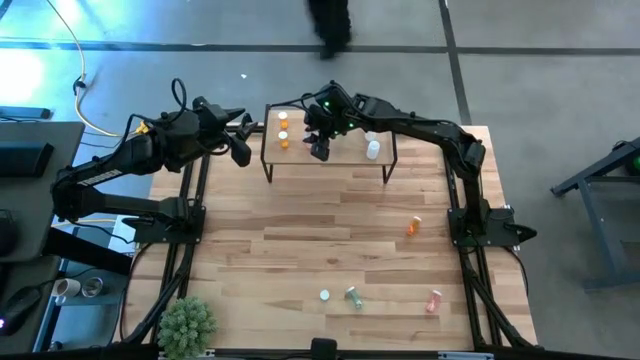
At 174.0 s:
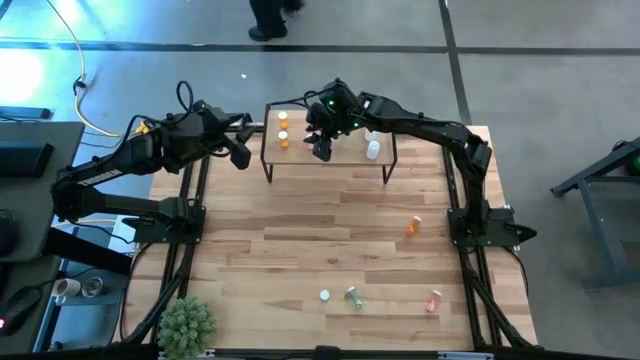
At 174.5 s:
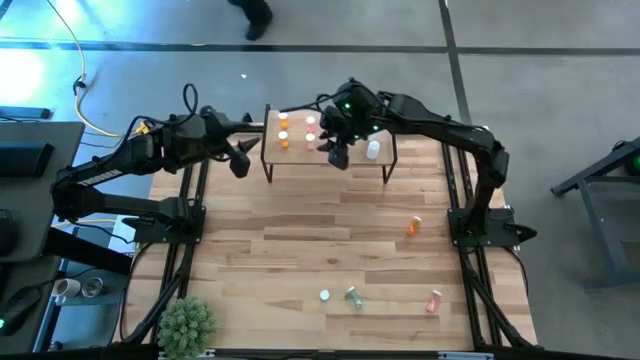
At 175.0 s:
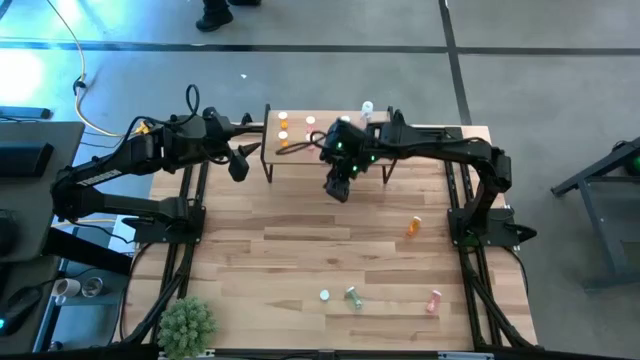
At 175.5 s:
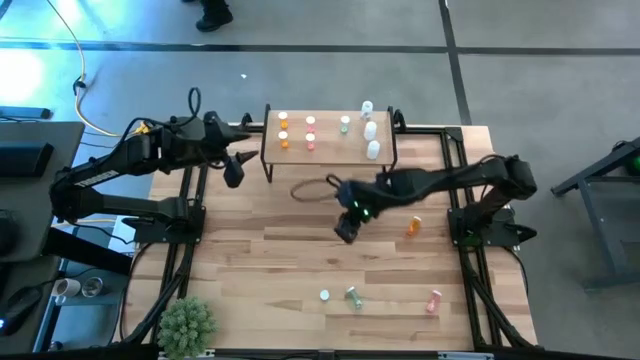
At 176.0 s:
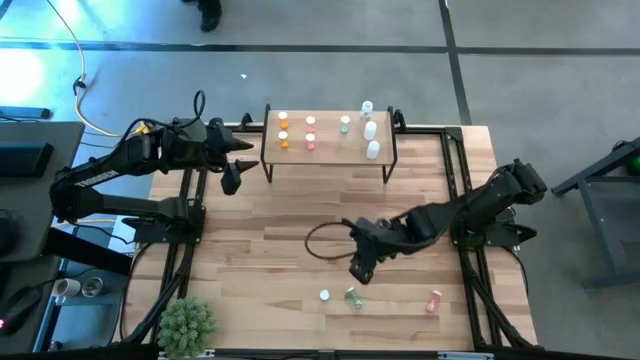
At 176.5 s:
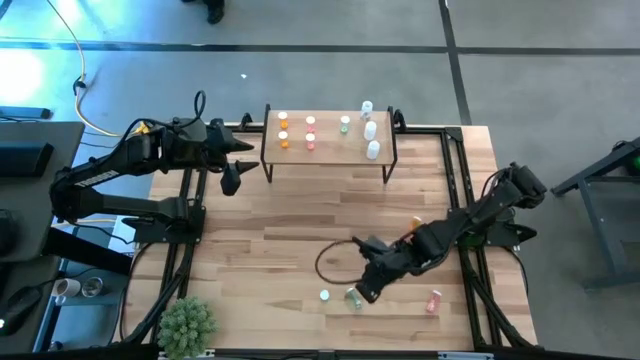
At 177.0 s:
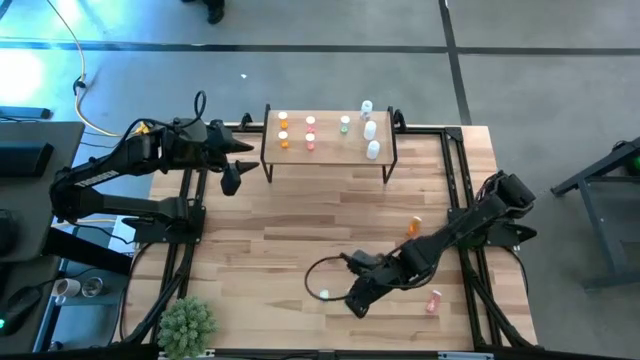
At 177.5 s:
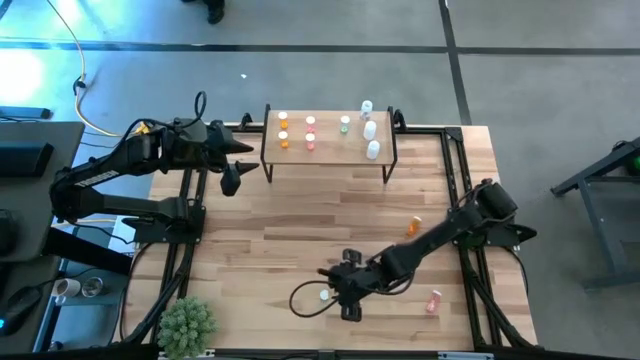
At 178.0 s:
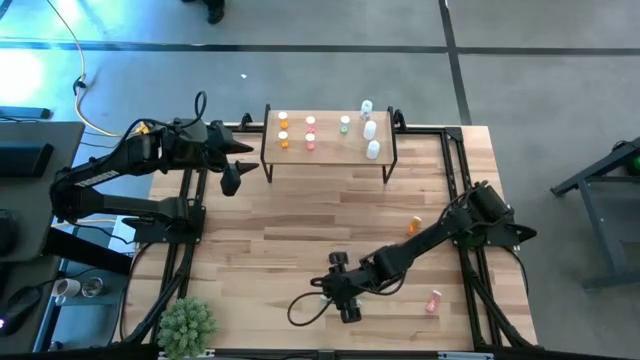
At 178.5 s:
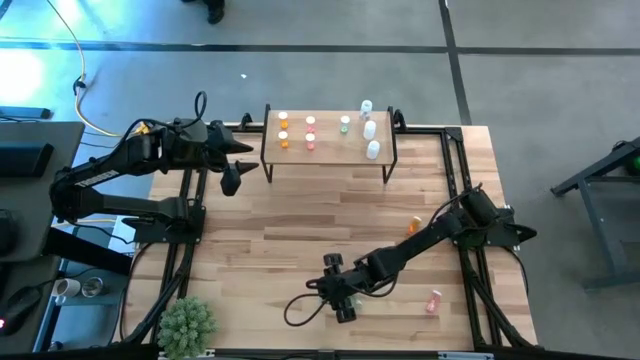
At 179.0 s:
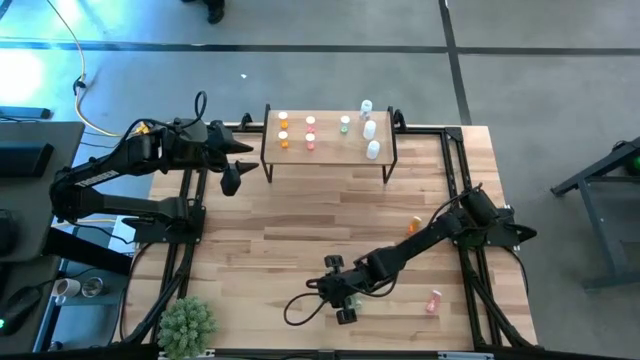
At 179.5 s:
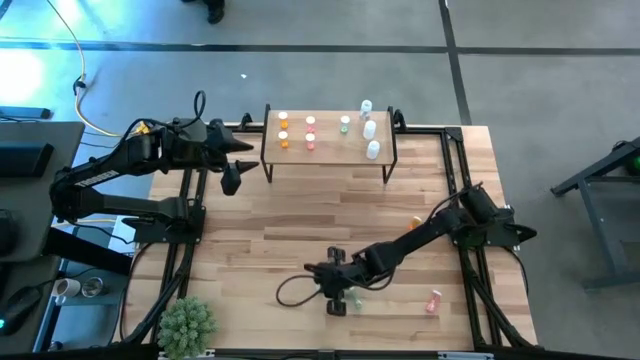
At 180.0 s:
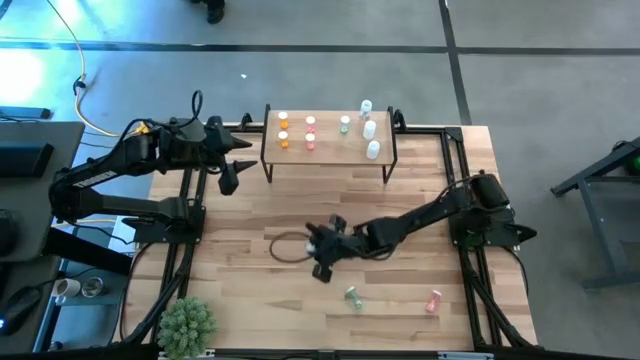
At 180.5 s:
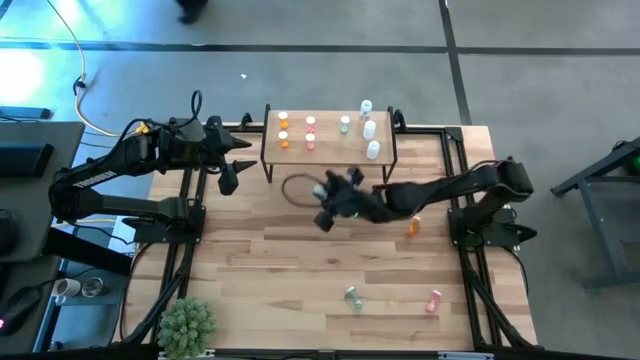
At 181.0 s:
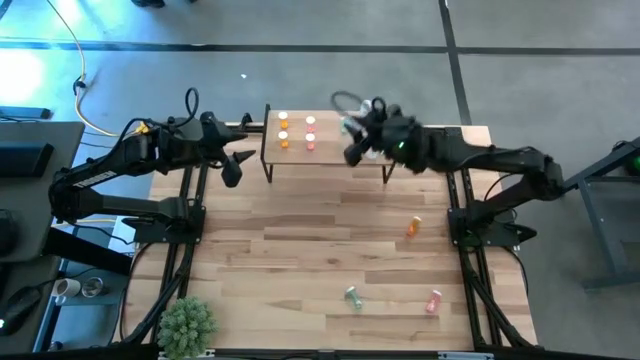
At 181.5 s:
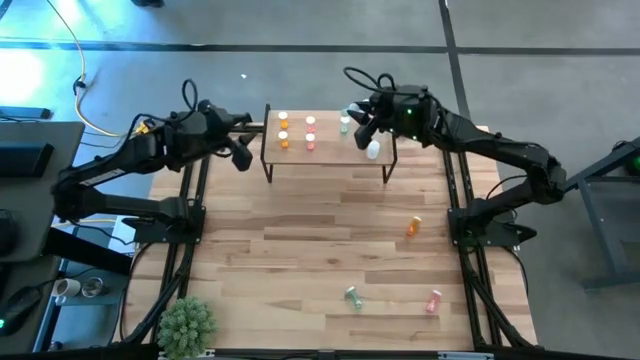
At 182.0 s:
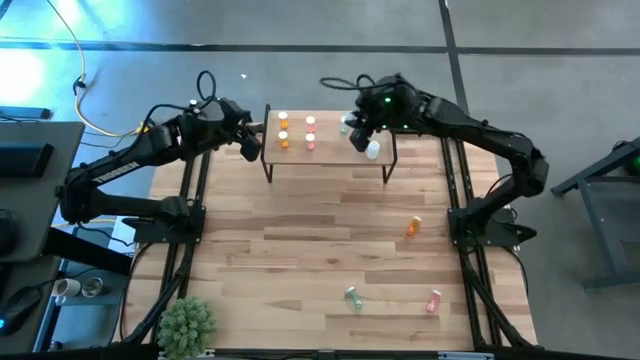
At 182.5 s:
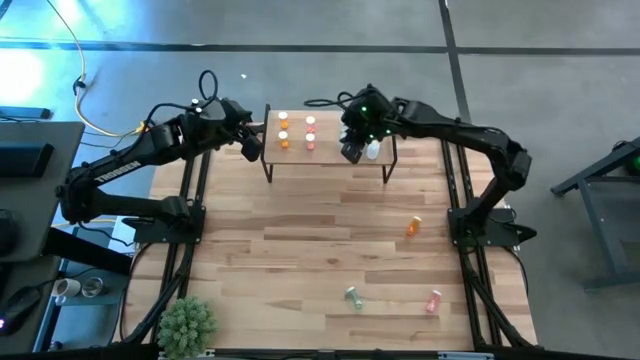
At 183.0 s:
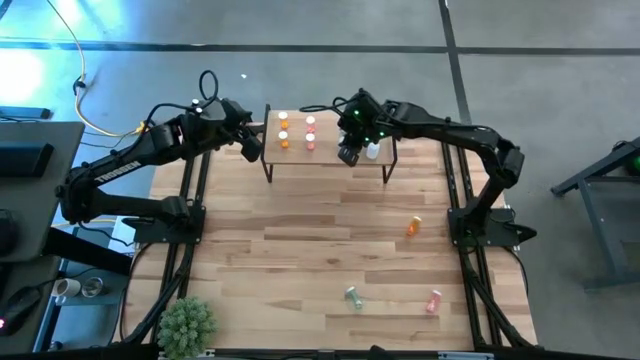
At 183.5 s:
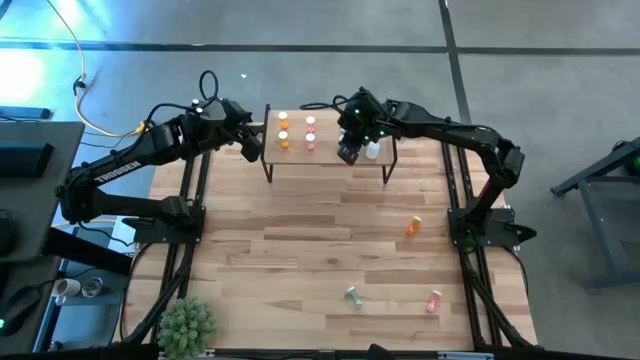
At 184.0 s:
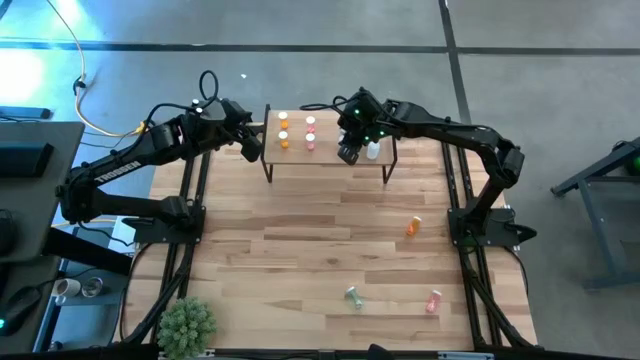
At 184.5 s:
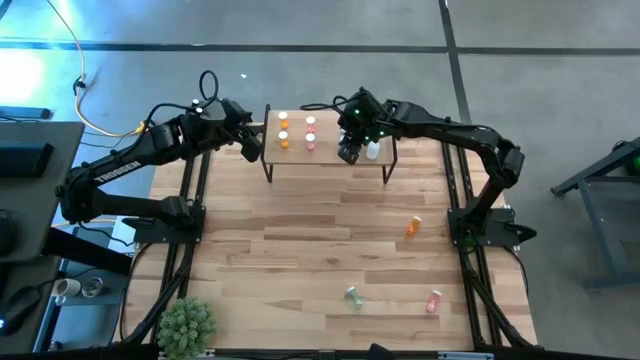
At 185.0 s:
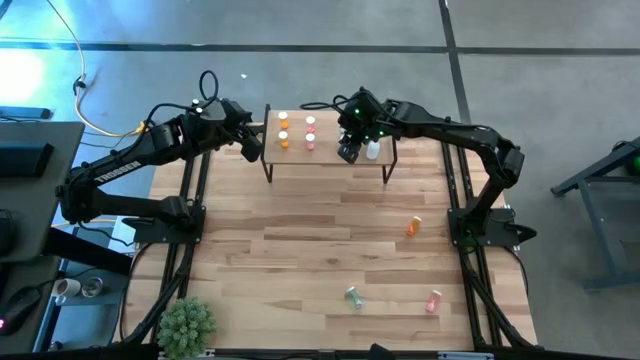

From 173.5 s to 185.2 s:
Task: Pick and place medicine bottles onto shelf by color
Put the left blue pill bottle on the shelf aligned with the blue pill bottle

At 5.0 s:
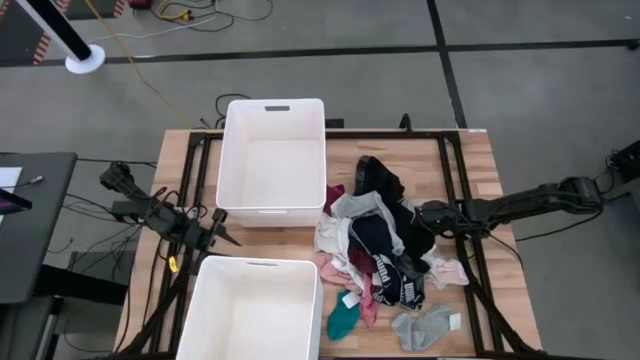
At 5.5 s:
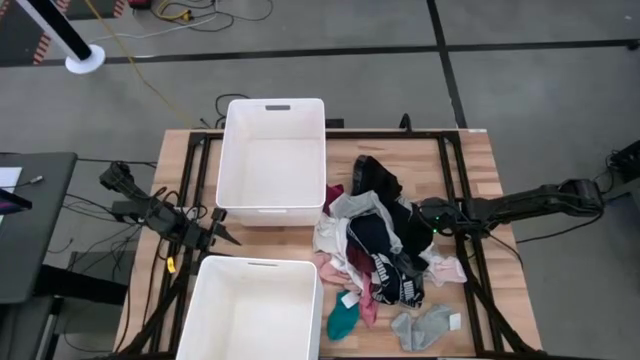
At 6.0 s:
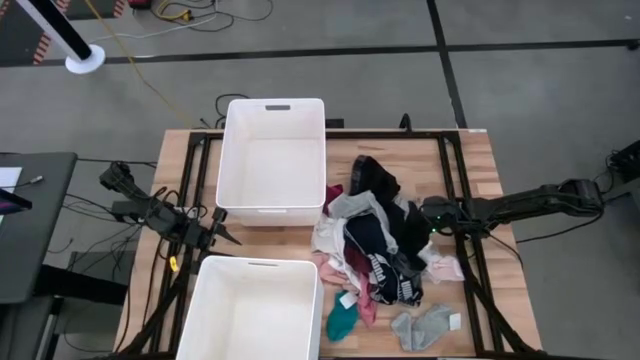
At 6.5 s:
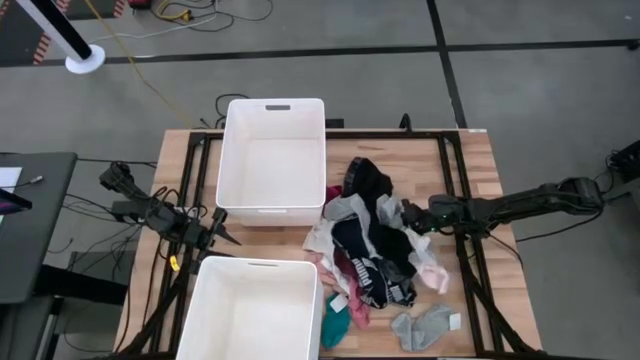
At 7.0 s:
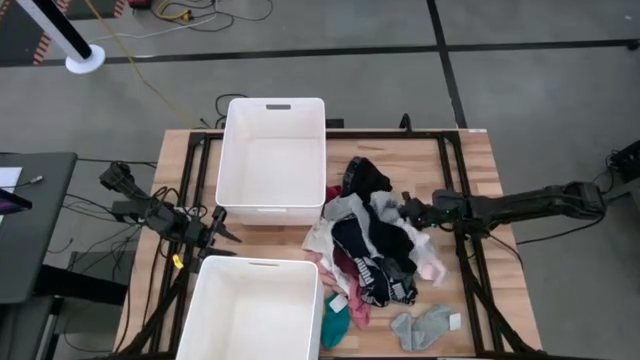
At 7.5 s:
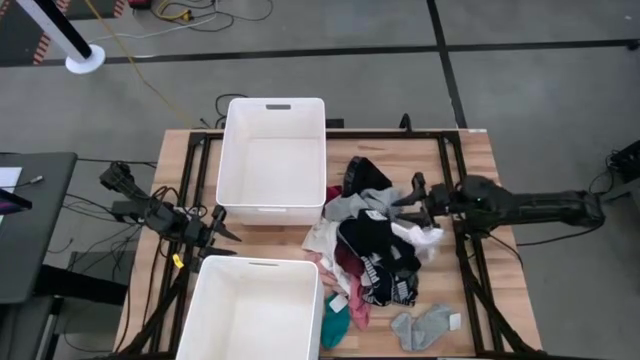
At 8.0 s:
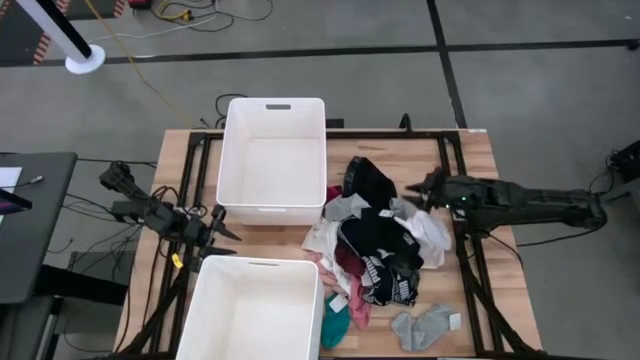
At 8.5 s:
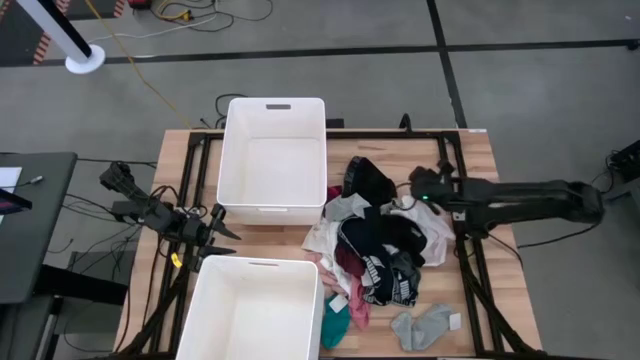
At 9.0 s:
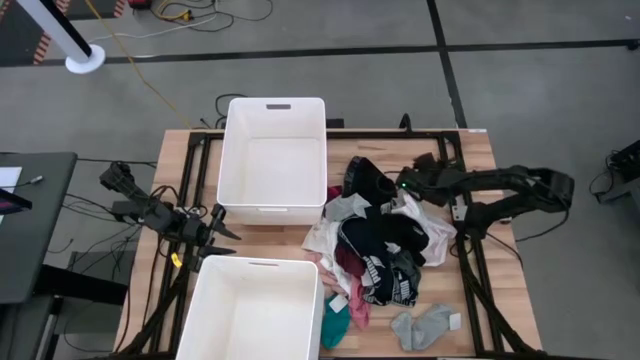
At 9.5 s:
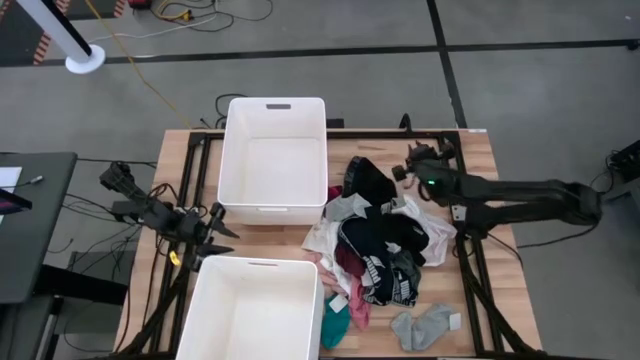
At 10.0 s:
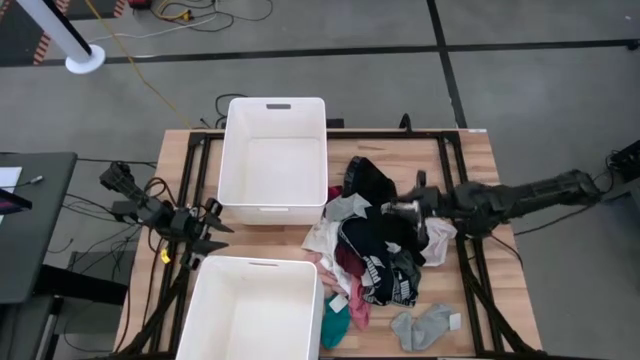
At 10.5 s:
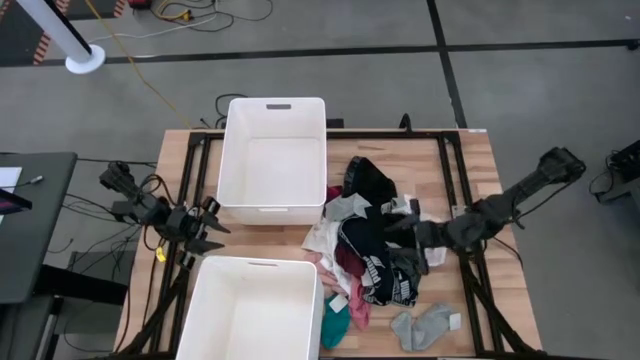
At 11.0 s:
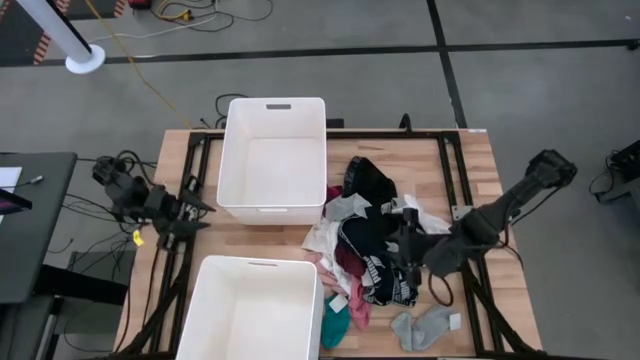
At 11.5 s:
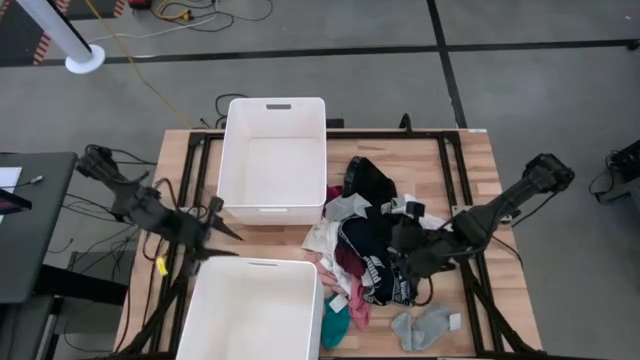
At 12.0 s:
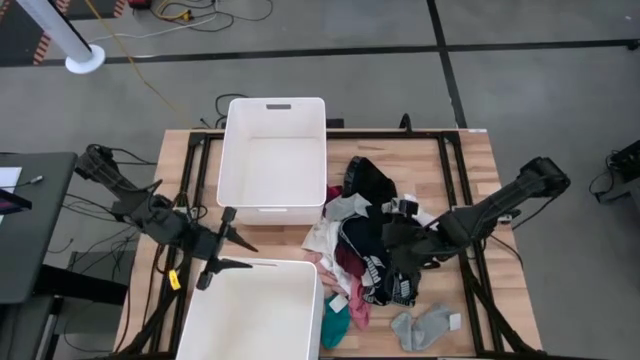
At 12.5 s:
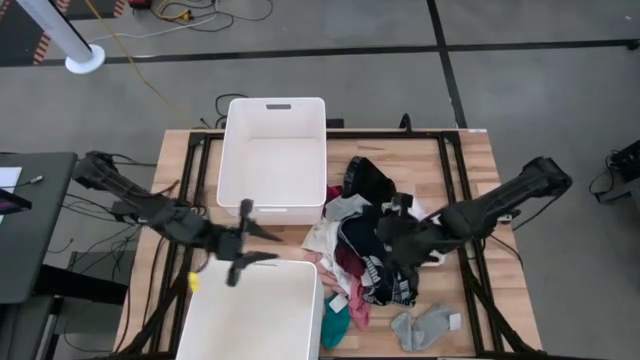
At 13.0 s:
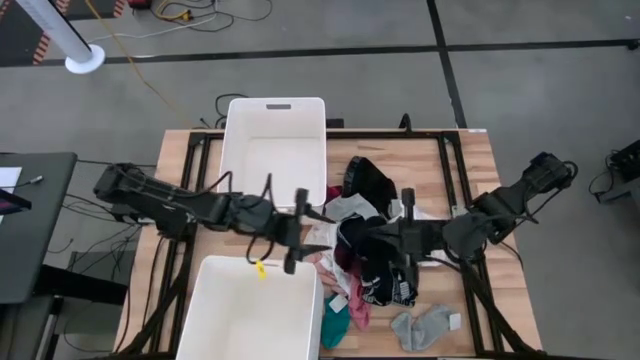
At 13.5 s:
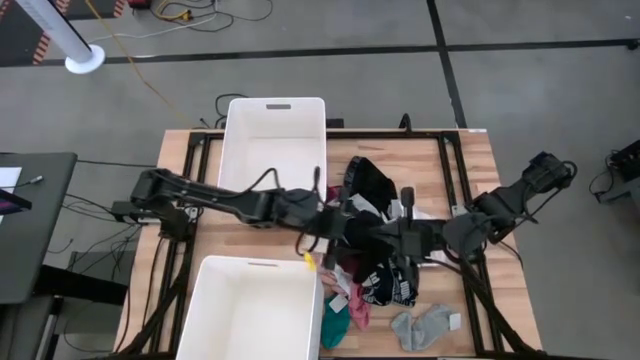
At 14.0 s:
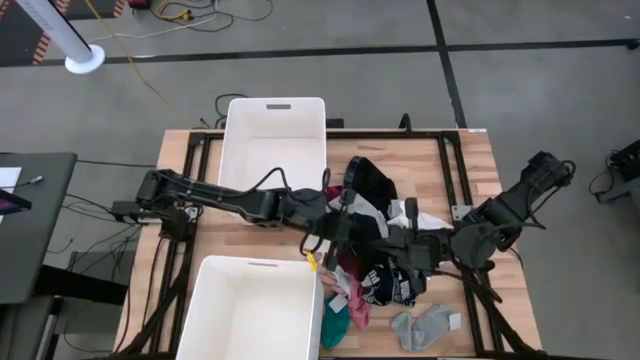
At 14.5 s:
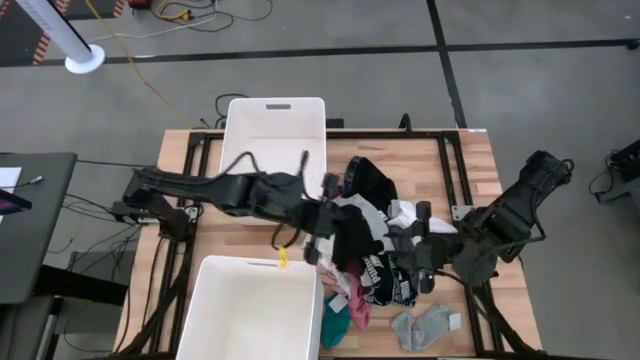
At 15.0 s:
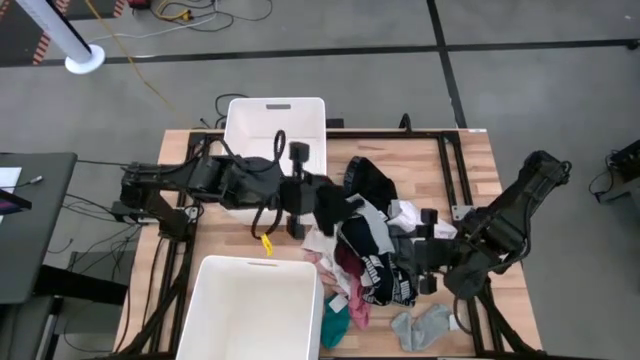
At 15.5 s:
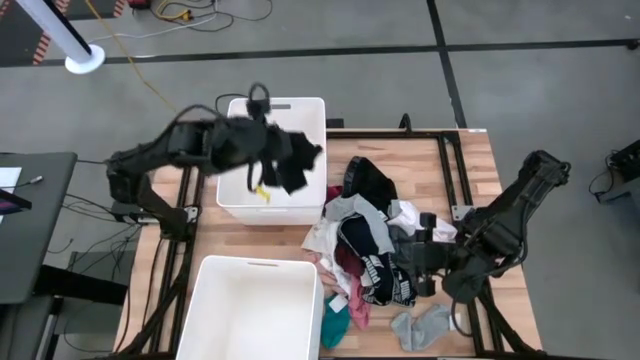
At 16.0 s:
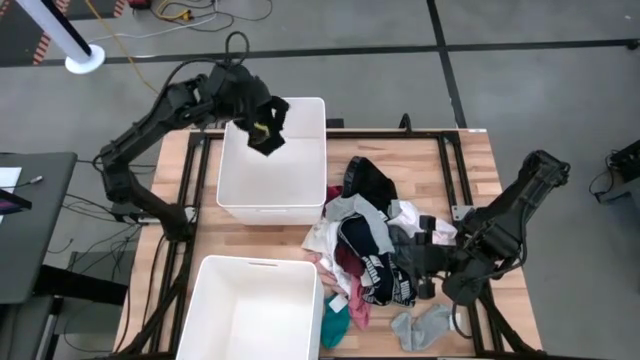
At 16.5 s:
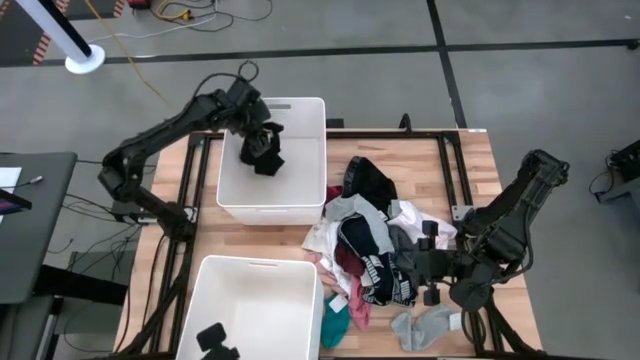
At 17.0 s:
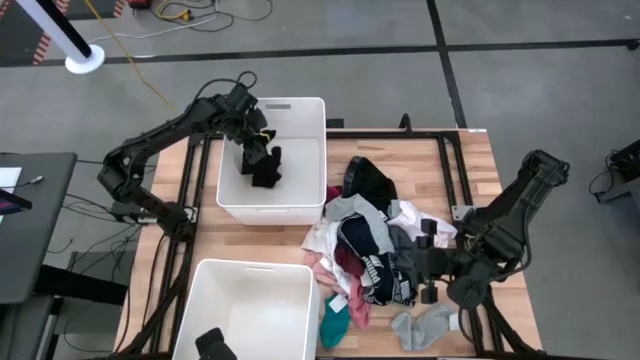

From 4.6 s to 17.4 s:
Task: Sort clothes
Put the black underwear into the top white laundry bin
